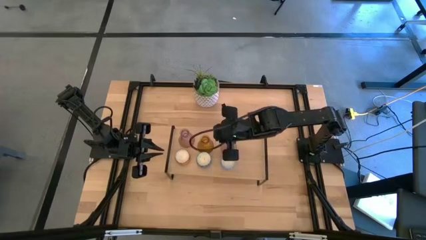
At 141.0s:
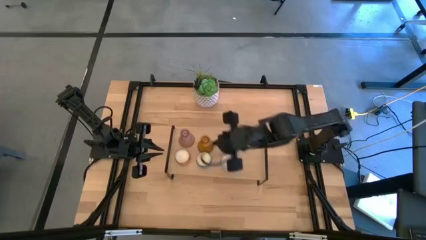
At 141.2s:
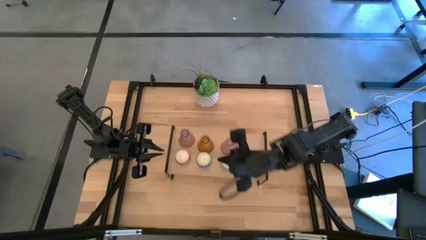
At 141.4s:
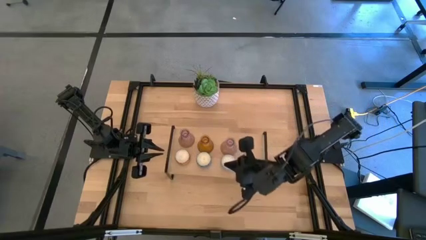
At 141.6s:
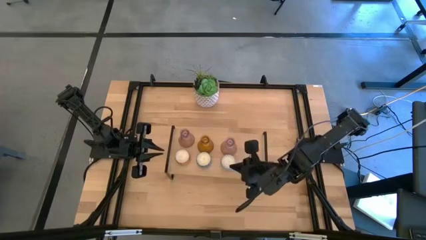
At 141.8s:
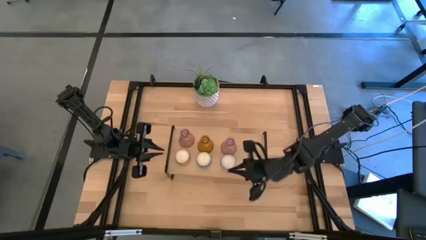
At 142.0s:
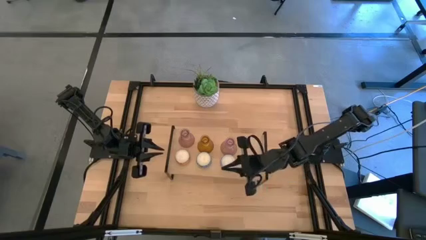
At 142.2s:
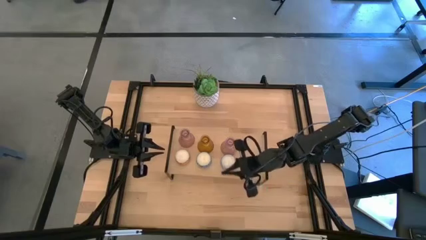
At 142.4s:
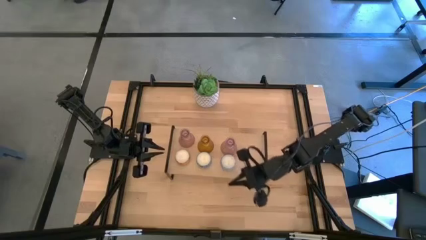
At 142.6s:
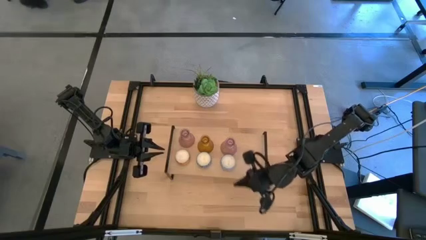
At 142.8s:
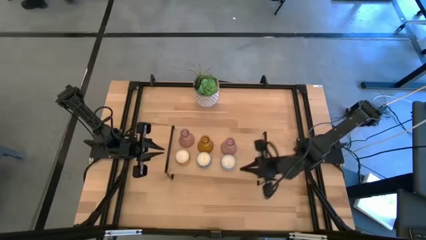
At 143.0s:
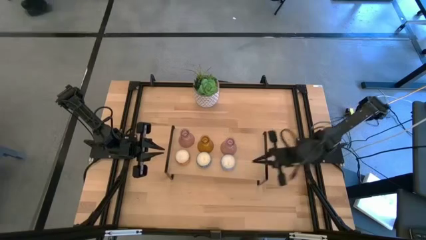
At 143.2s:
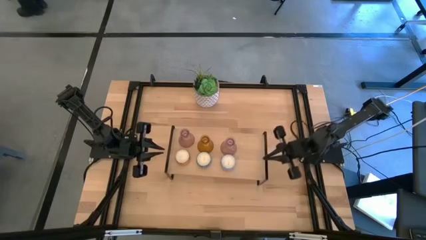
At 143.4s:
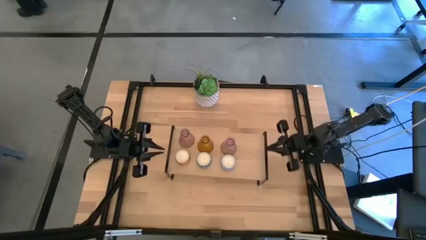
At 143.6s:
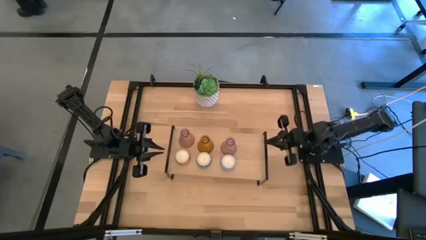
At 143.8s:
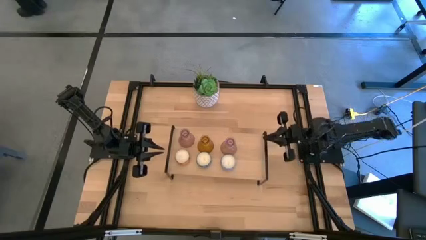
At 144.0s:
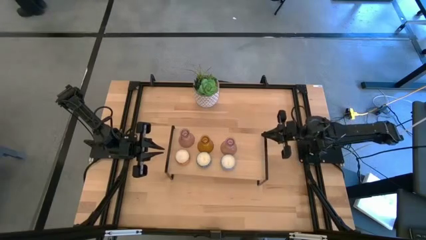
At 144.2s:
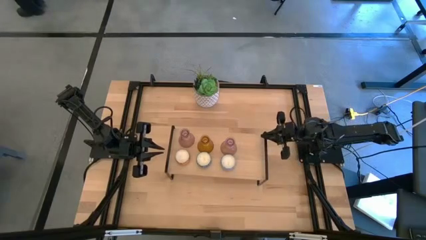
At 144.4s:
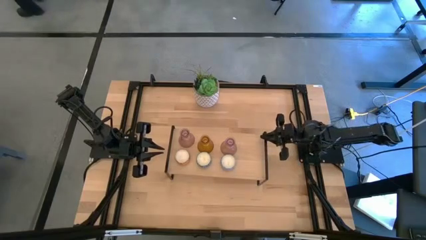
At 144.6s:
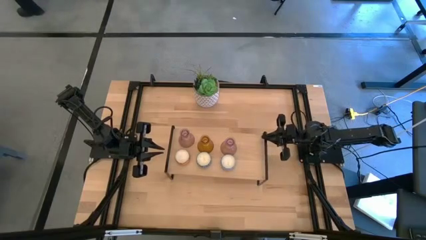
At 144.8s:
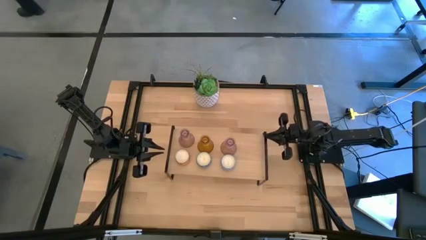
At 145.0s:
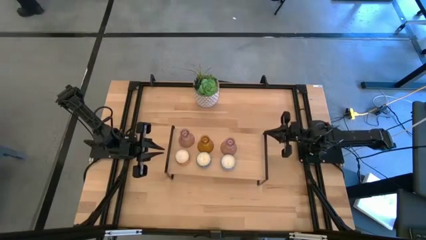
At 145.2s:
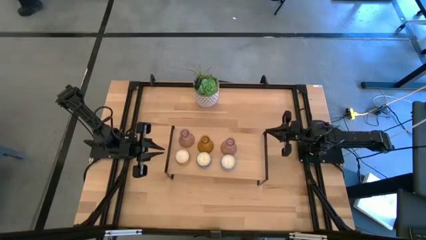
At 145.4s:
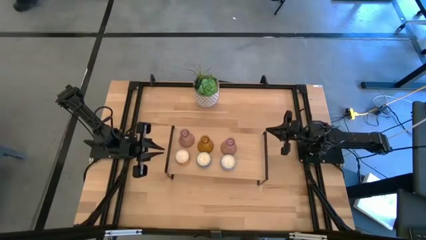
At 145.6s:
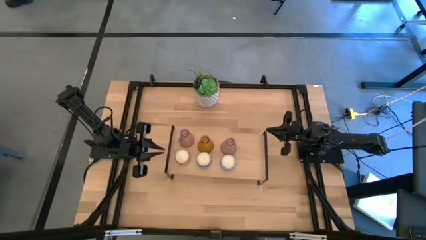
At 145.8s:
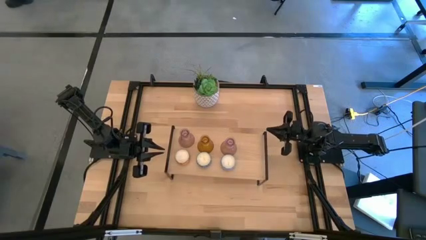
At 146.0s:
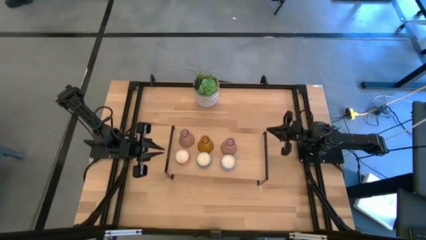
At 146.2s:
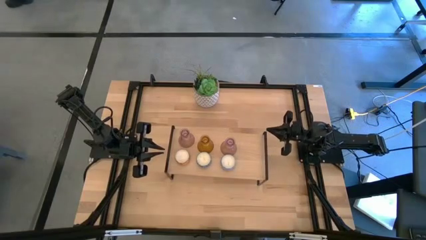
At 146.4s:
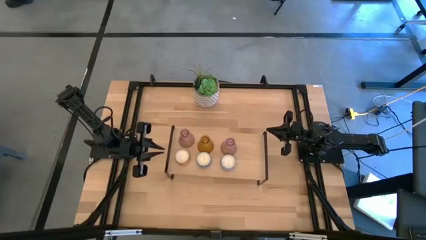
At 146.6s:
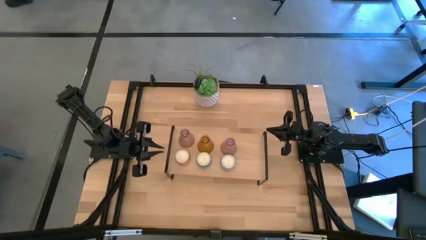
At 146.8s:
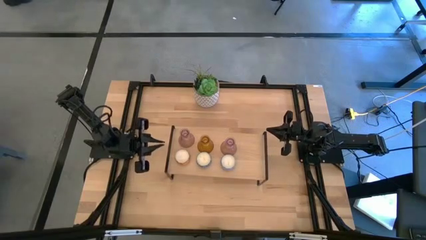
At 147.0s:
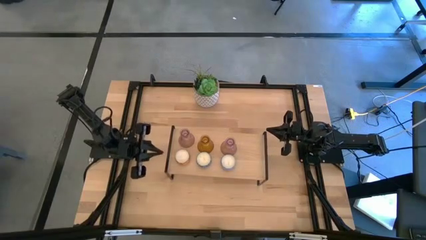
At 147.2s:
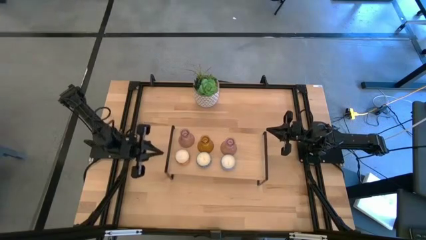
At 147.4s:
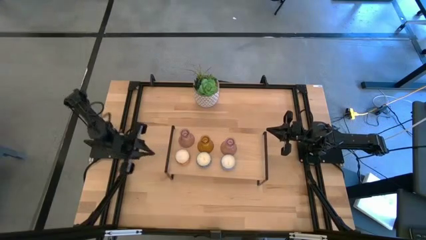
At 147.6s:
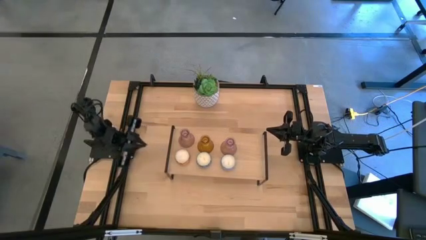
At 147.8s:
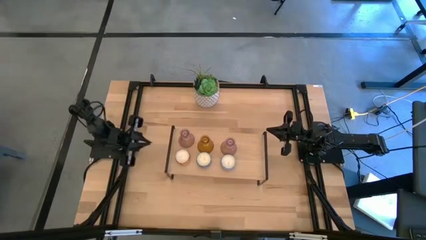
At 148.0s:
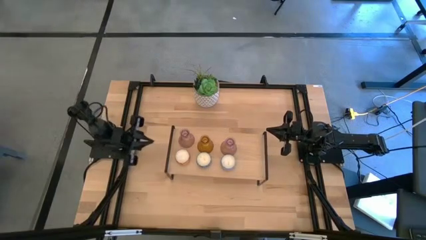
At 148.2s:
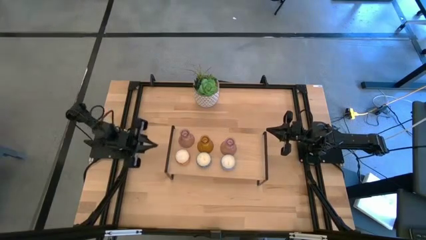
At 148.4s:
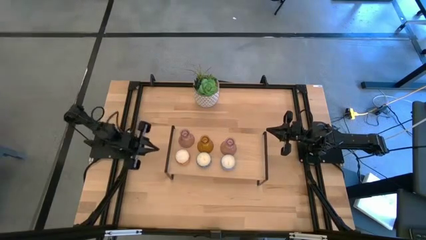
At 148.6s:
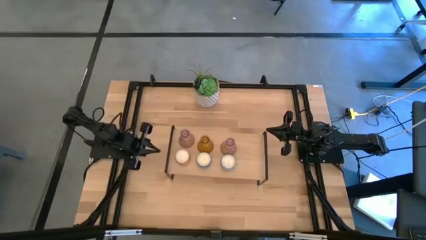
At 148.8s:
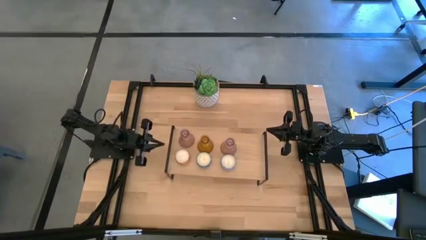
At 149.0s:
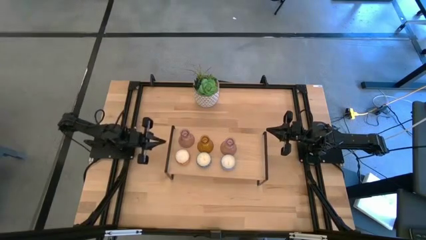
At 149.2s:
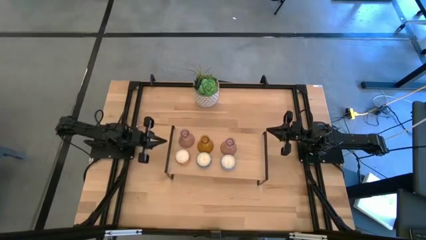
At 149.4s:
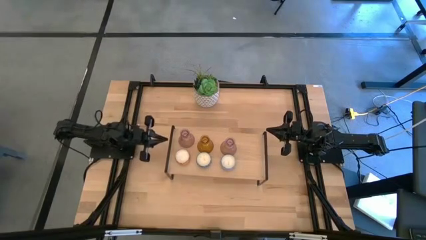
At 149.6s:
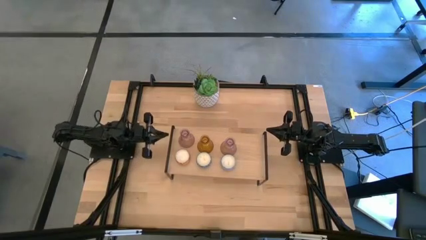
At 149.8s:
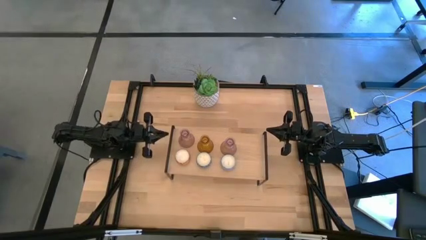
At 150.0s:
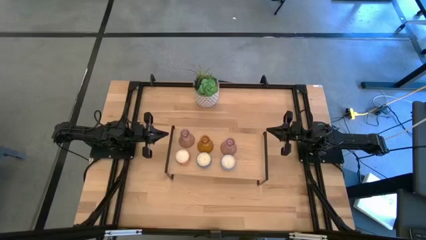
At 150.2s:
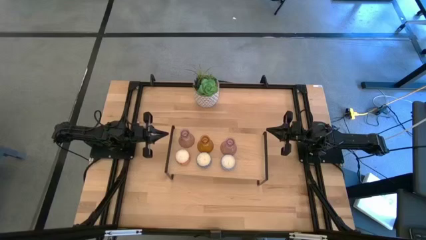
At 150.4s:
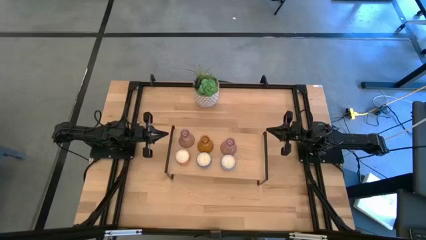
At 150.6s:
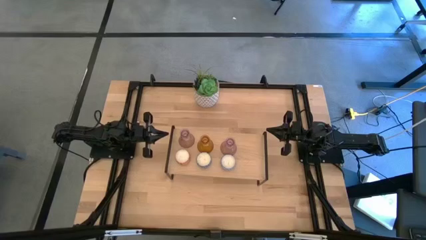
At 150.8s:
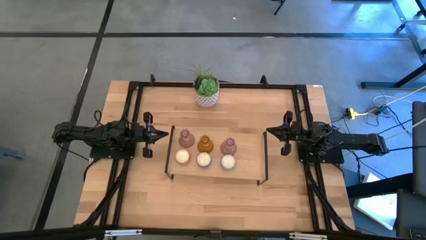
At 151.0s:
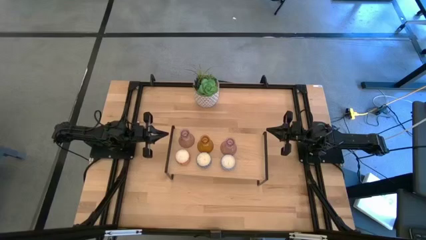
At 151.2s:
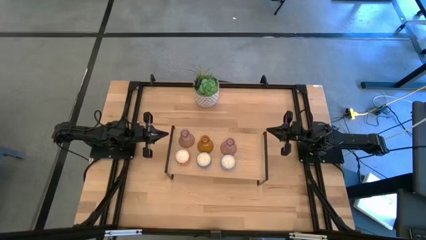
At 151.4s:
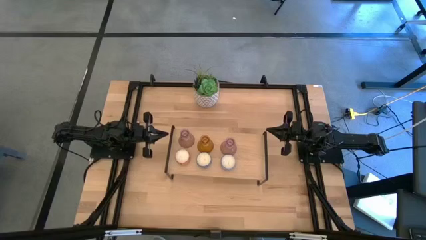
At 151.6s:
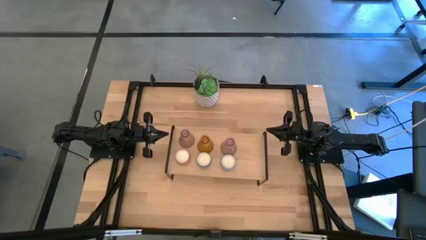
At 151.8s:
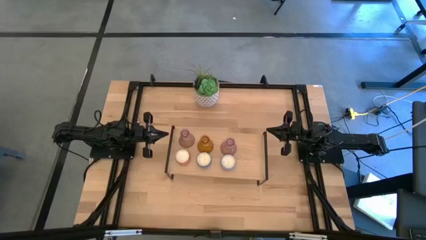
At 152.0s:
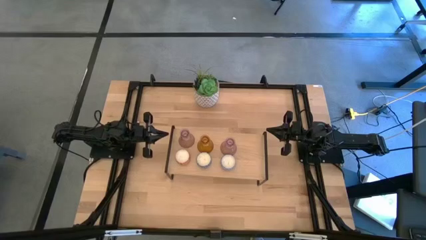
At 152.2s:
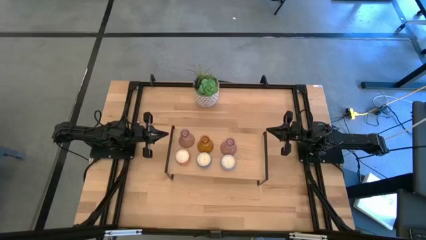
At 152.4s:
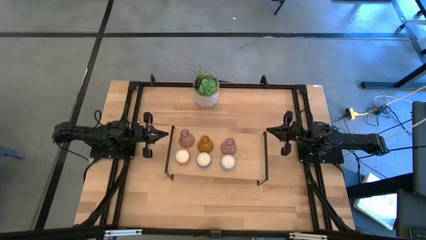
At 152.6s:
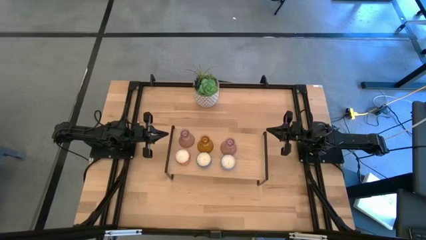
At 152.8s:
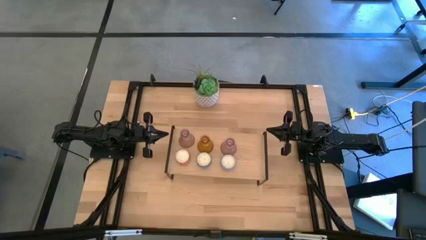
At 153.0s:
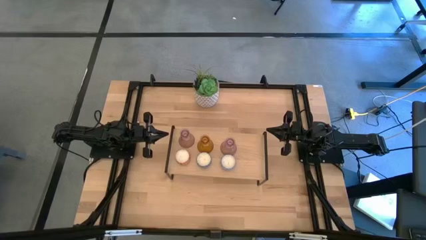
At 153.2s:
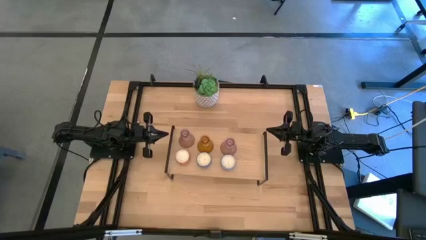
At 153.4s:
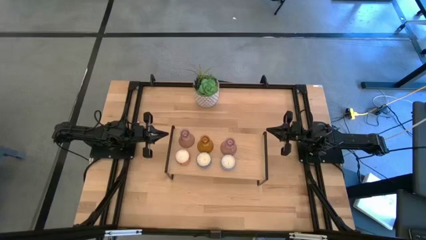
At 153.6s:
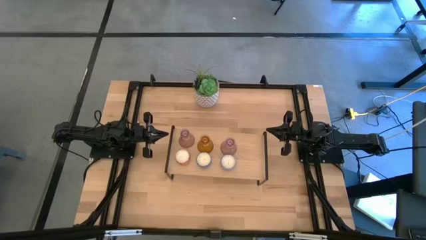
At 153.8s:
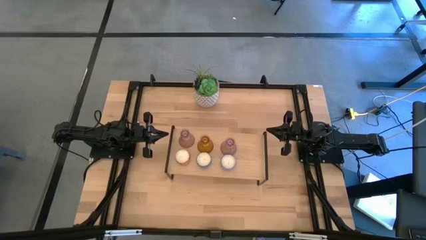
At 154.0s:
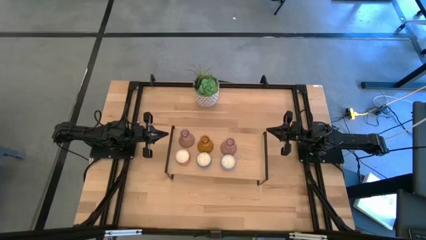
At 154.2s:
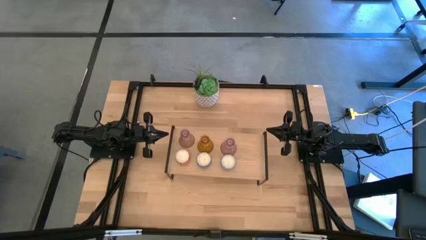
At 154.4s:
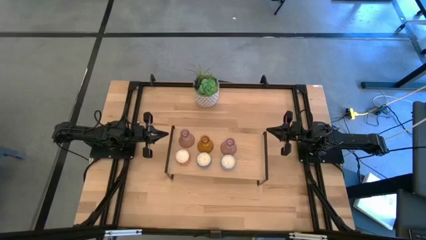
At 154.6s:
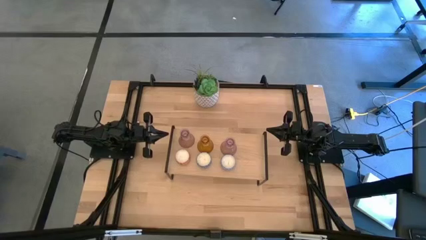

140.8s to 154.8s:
Task: Pick & Place candle stick holders
Return to Home Position
